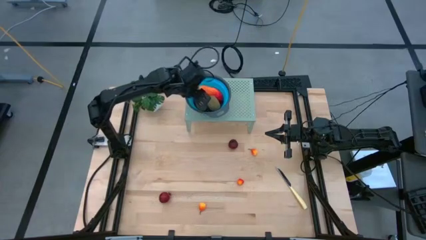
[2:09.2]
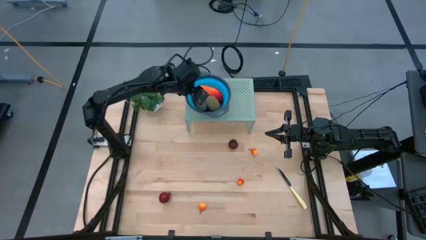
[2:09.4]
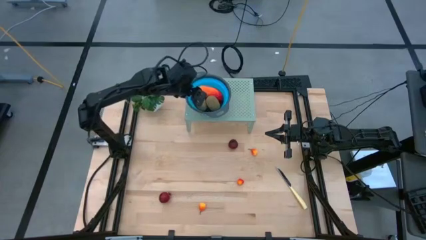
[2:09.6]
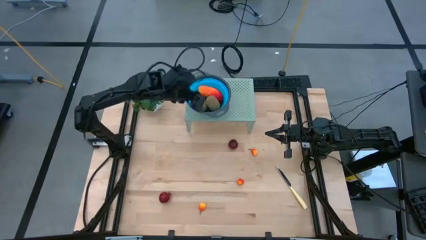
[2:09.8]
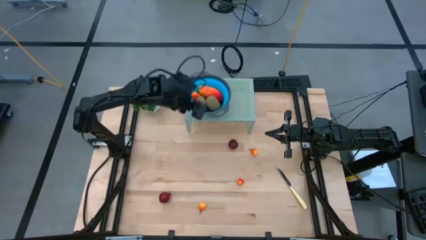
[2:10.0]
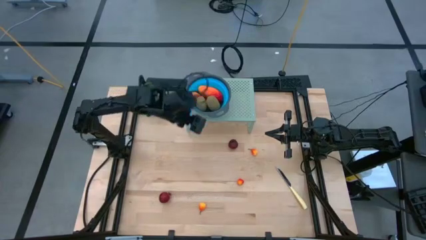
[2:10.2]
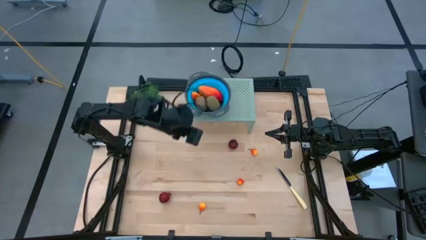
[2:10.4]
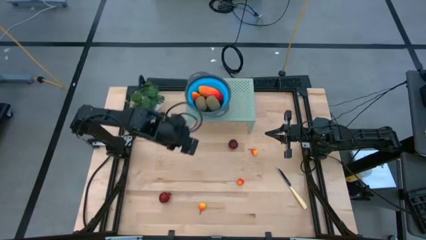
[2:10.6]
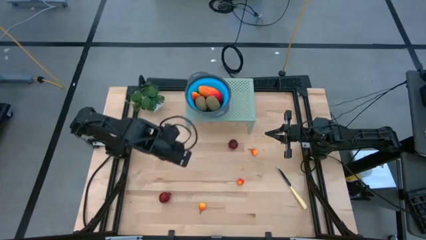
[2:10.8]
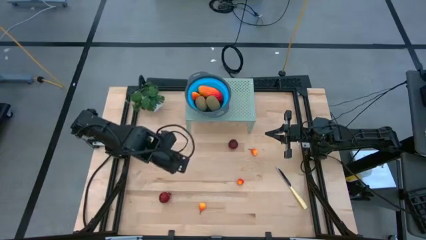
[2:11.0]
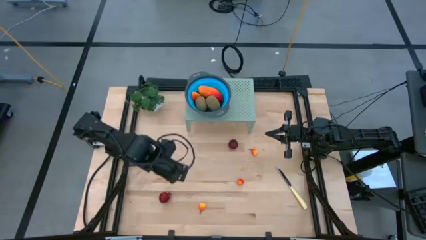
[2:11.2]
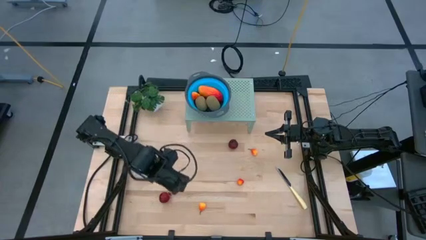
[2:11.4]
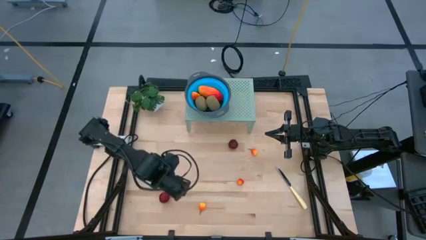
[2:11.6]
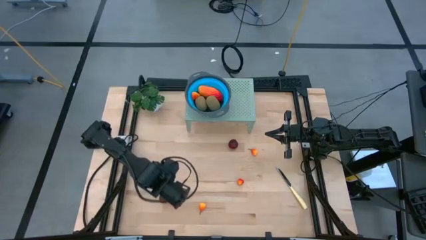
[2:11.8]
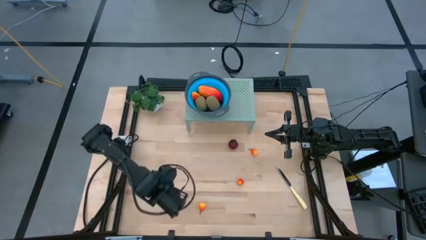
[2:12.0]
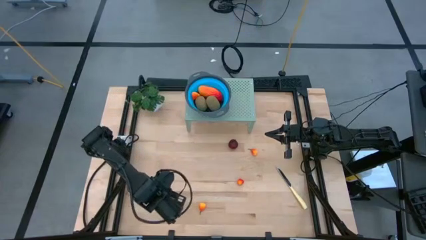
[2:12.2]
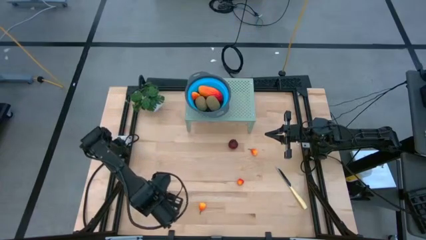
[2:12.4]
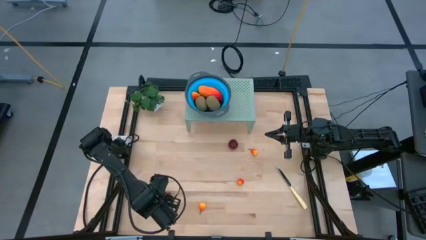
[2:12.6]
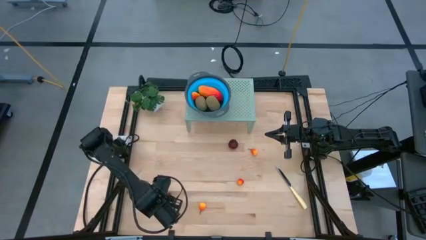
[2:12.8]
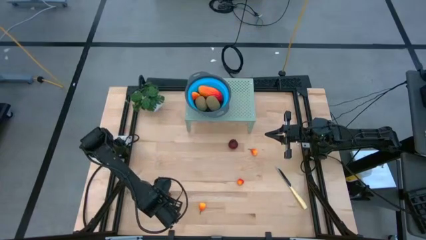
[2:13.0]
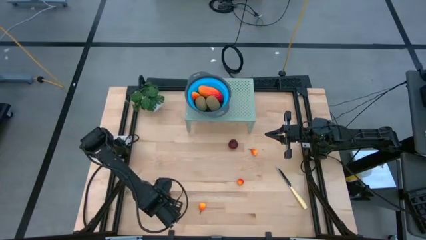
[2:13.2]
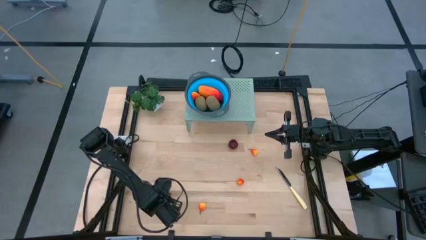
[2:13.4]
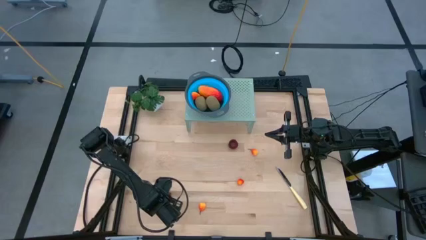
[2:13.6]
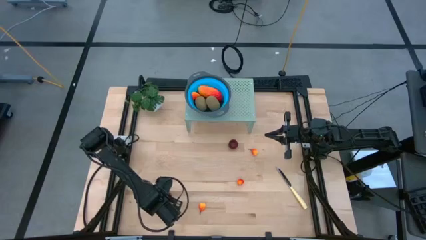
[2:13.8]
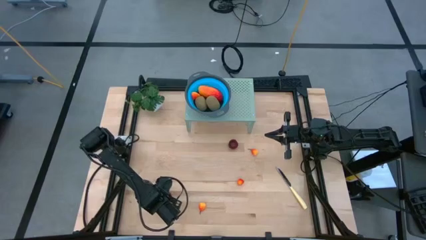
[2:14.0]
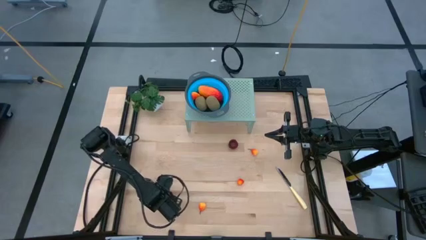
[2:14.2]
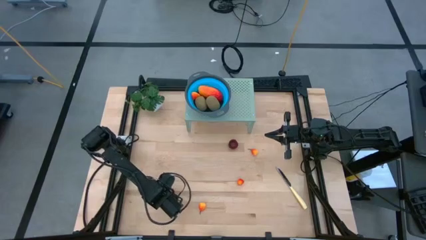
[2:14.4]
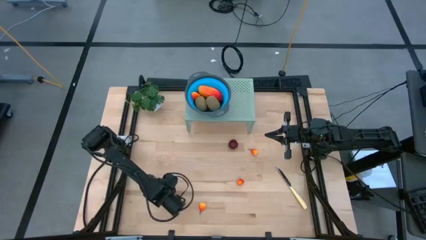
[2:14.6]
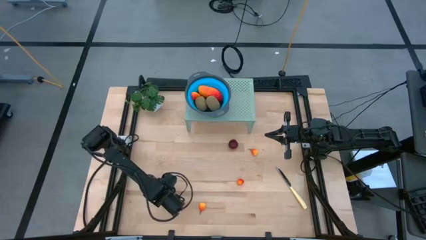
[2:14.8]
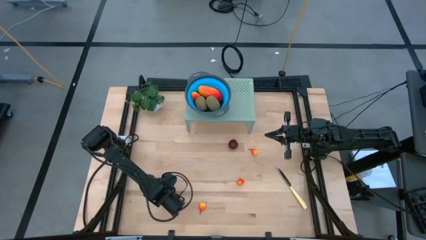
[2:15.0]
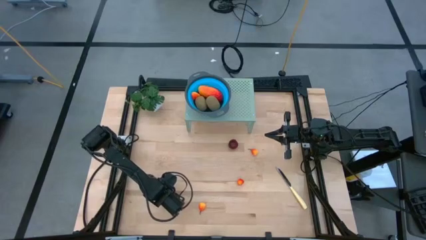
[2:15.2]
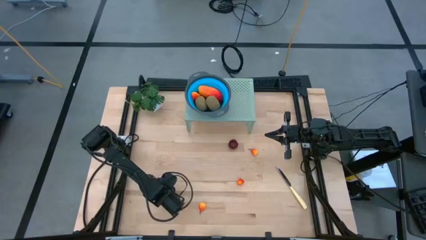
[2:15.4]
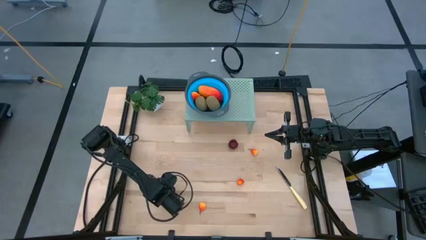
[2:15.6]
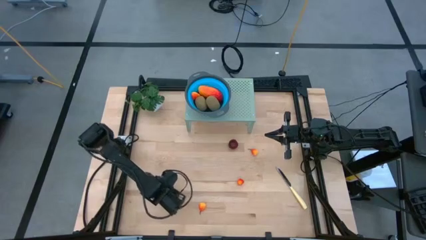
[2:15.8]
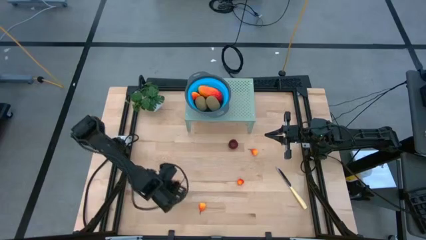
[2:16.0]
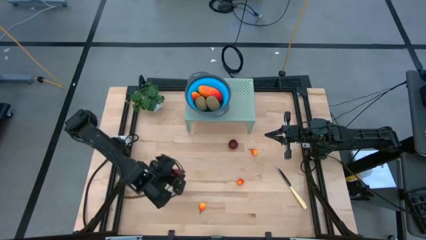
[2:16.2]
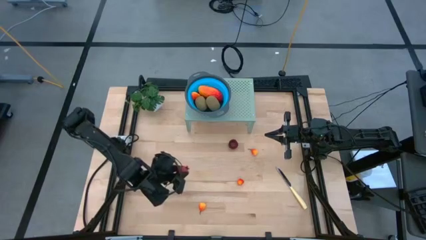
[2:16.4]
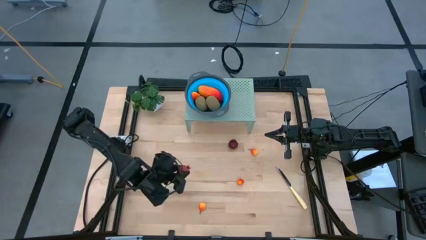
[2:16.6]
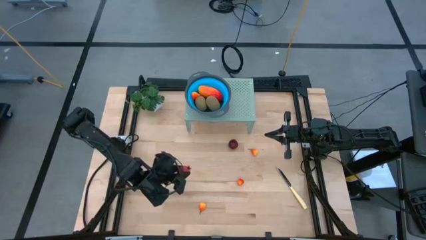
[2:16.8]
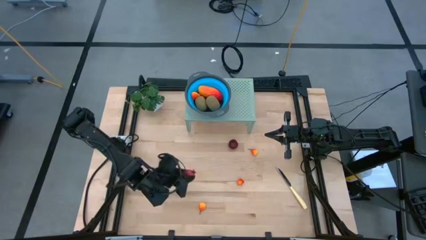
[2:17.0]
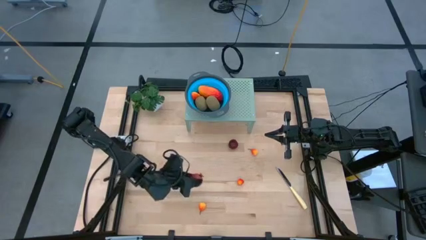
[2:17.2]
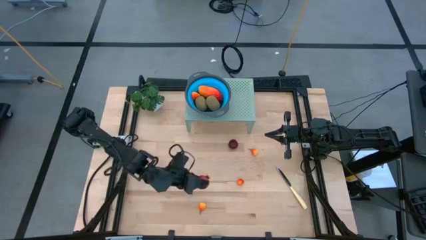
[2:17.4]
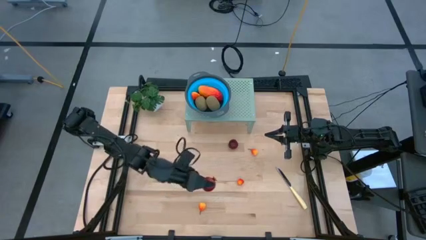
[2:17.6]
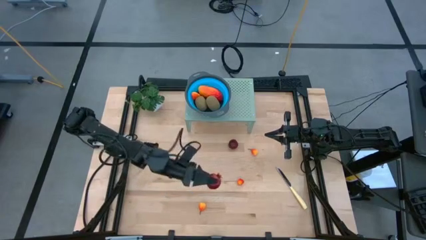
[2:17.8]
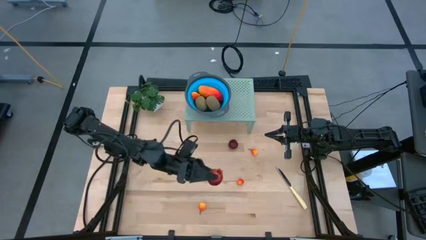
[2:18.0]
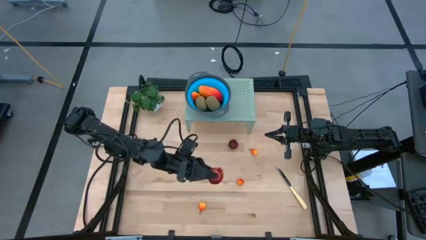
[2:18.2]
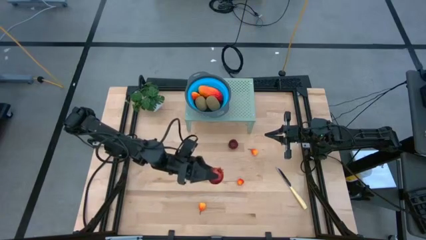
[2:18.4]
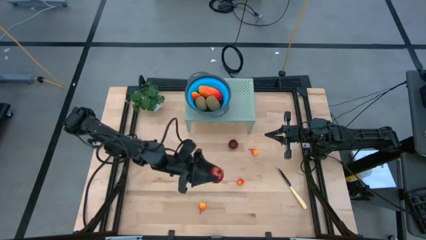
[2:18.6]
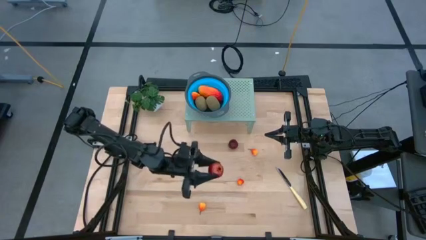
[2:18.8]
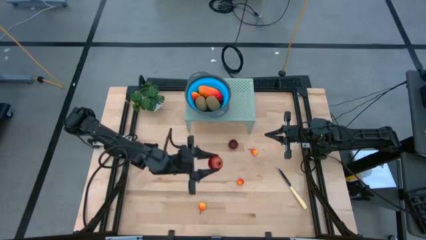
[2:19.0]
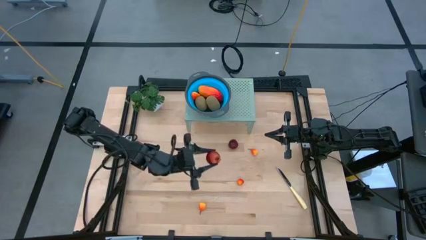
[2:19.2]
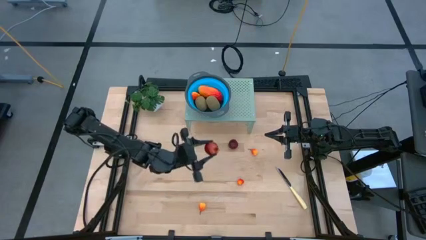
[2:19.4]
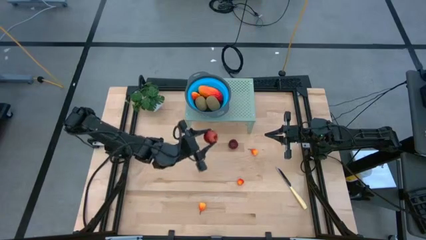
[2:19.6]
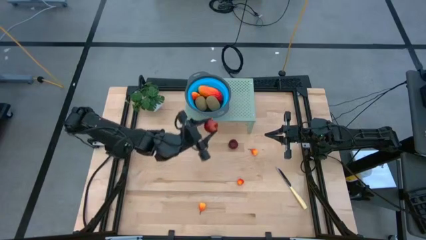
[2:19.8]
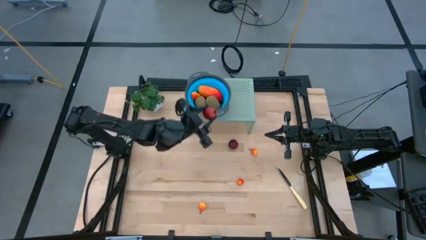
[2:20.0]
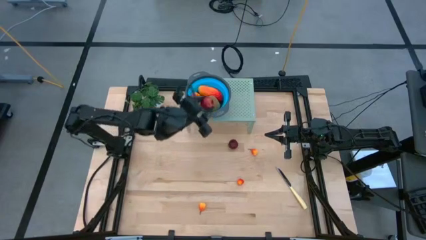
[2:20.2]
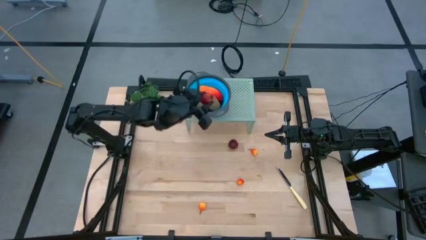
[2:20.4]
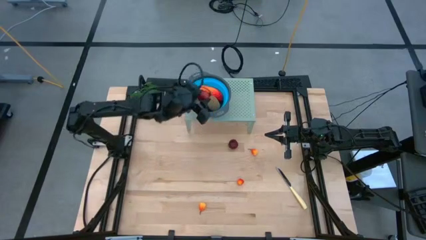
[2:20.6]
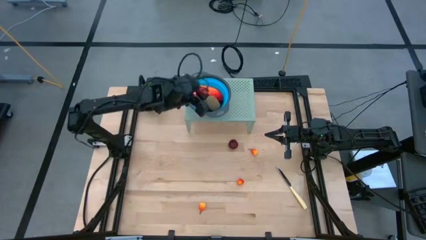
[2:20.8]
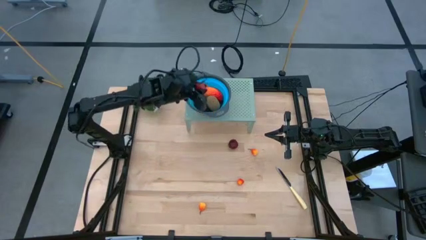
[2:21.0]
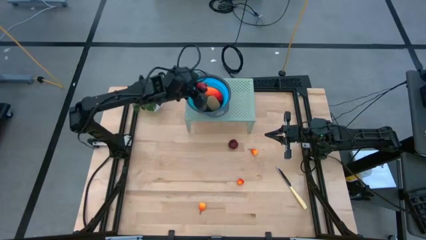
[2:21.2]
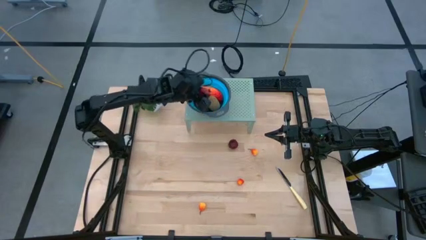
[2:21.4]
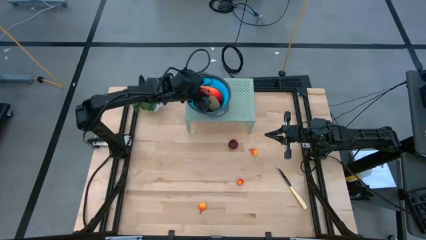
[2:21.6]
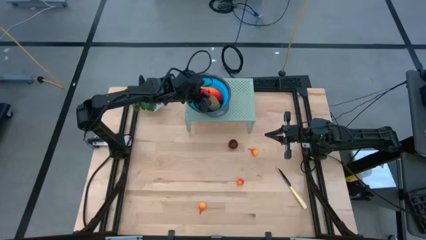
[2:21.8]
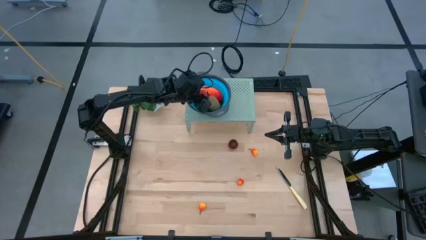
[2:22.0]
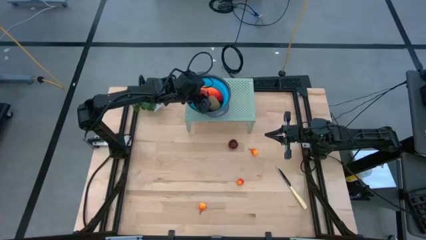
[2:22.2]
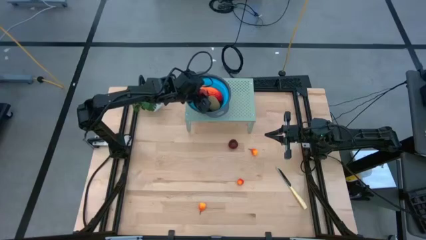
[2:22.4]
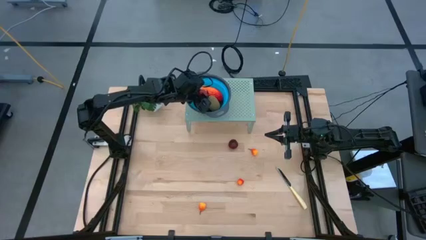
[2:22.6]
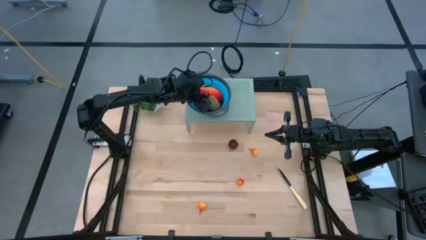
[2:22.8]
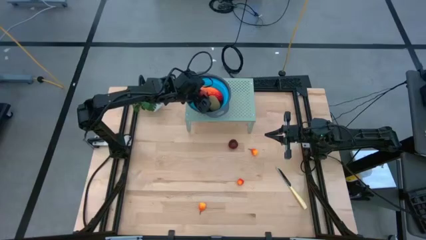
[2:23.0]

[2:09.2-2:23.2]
Task: Pick & Place Fruit
Put the red pomegranate into the blue bowl on the shelf

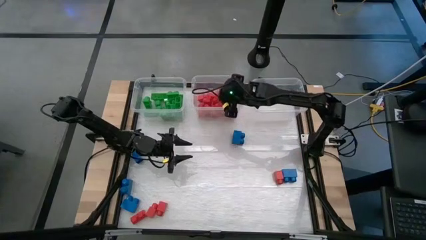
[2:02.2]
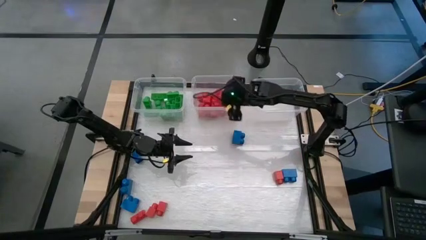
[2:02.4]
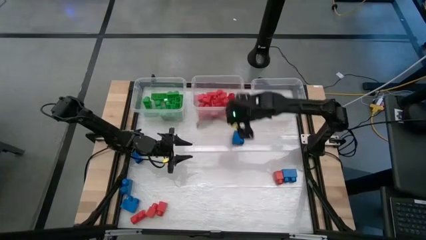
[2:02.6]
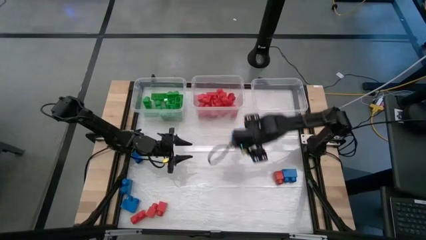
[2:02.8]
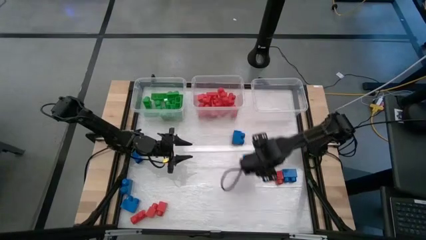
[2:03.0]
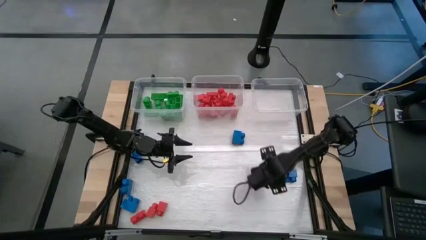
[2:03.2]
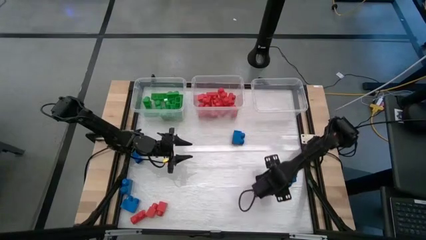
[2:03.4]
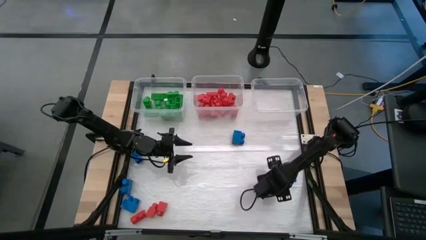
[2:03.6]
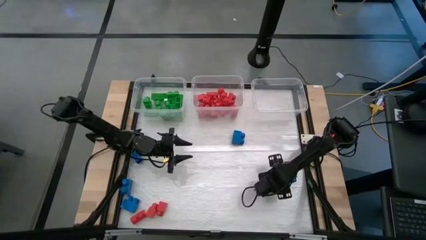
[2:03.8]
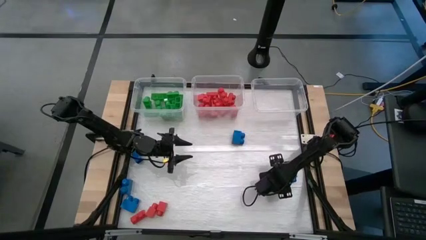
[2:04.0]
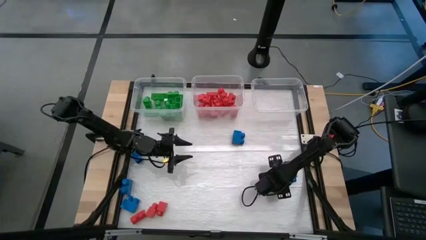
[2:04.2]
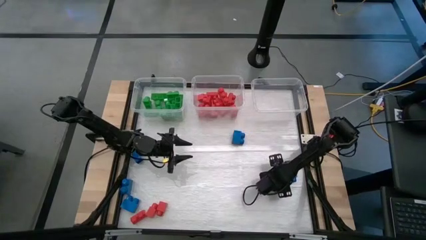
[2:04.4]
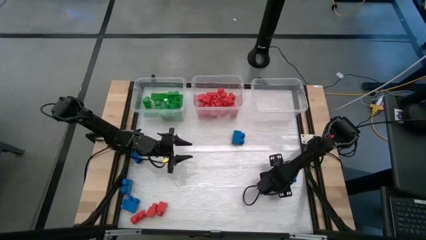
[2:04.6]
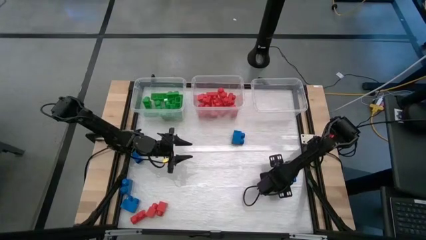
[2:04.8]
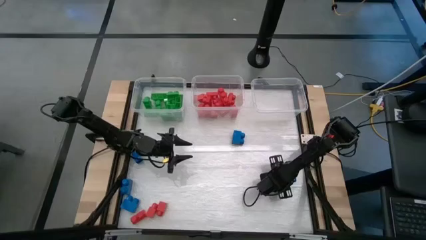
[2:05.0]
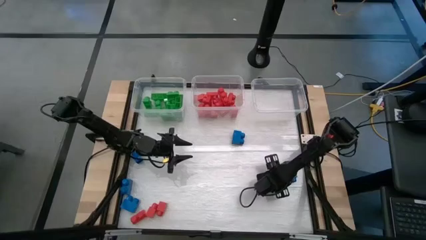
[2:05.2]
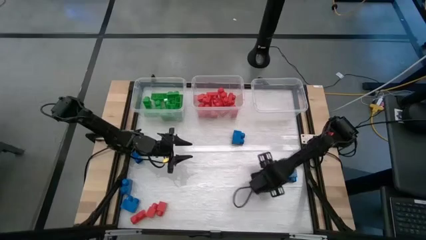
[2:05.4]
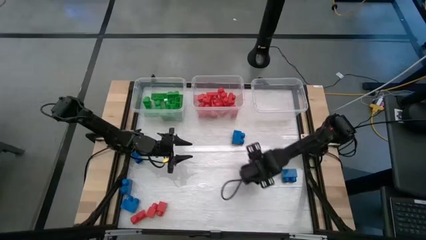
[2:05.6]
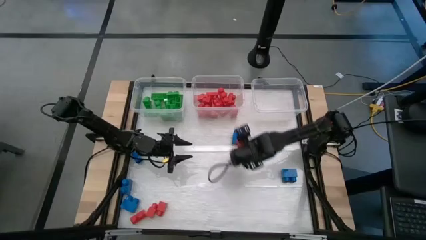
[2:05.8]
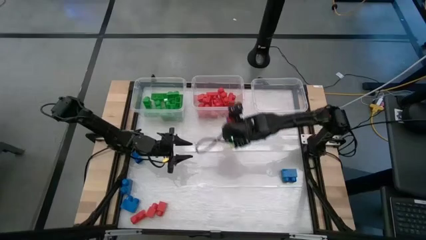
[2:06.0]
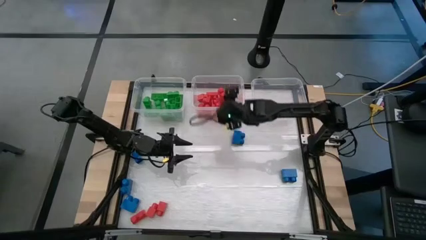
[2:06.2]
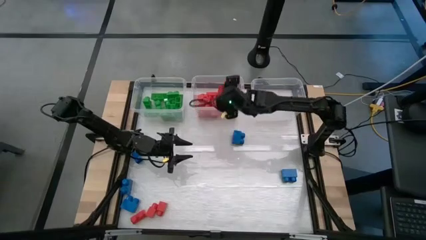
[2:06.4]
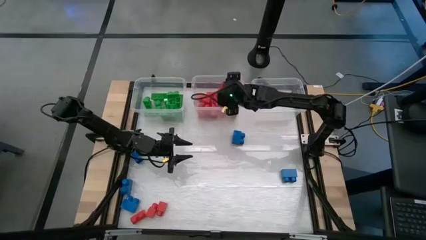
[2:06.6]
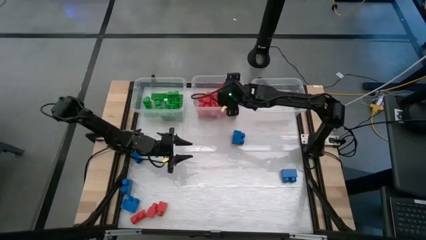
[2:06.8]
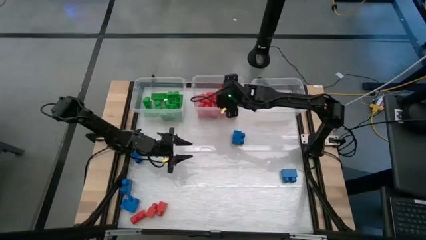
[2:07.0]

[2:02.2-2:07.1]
Task: Sort blocks
Put the red game piece into the middle transparent bin
